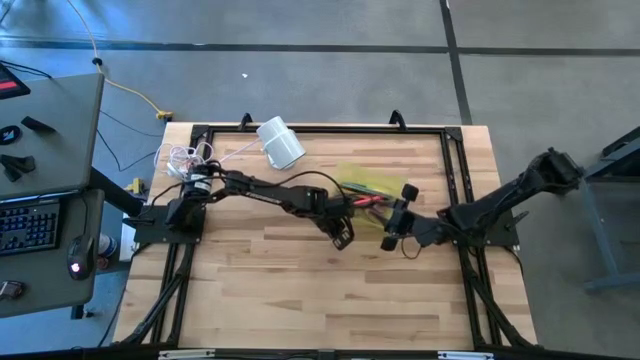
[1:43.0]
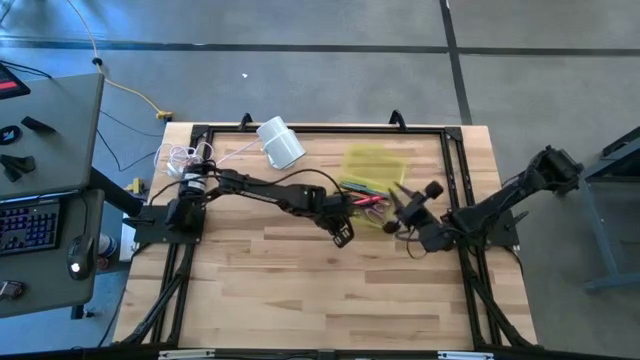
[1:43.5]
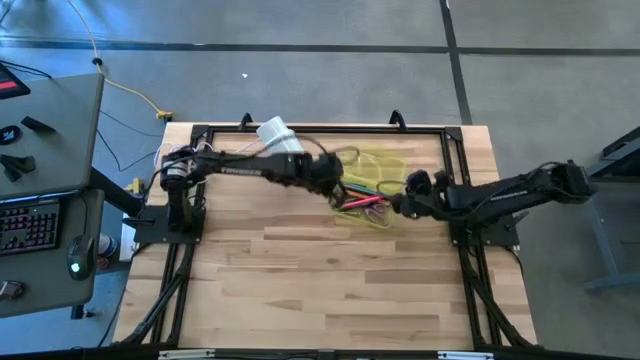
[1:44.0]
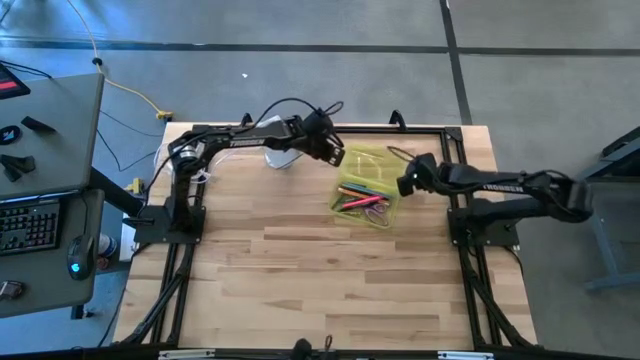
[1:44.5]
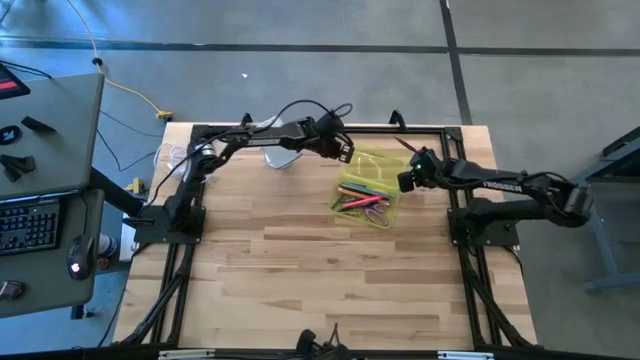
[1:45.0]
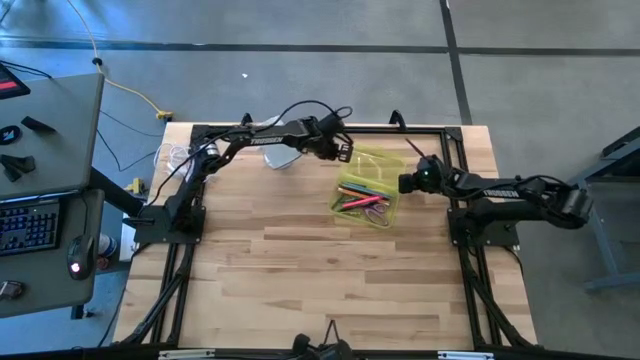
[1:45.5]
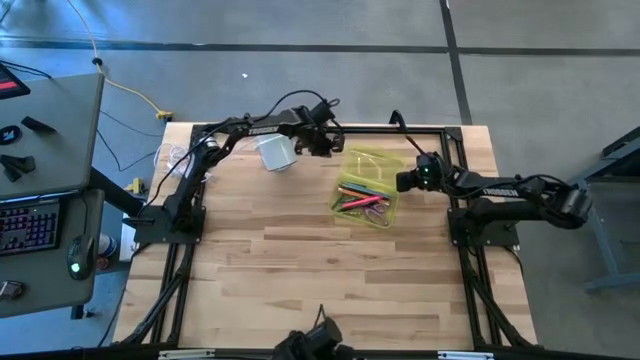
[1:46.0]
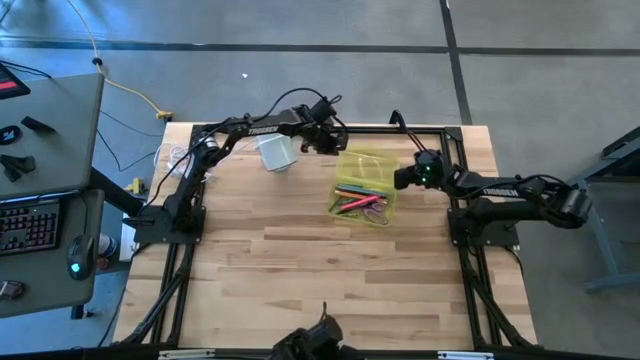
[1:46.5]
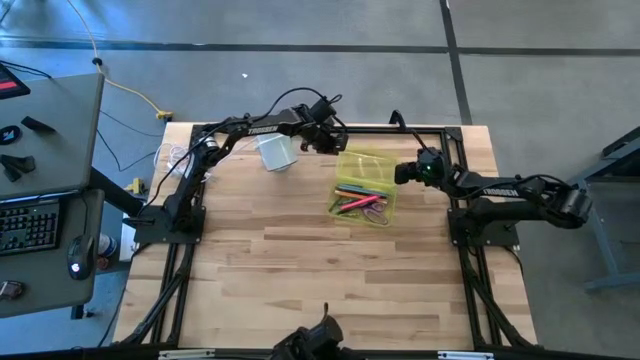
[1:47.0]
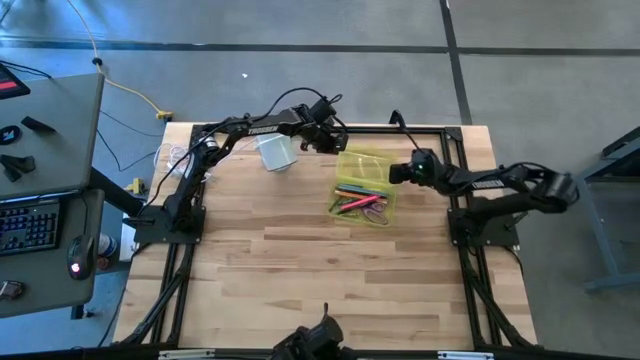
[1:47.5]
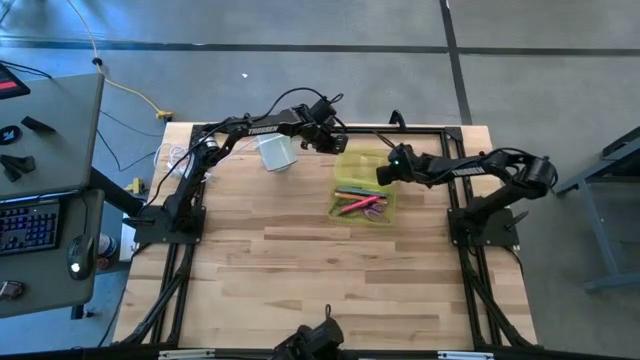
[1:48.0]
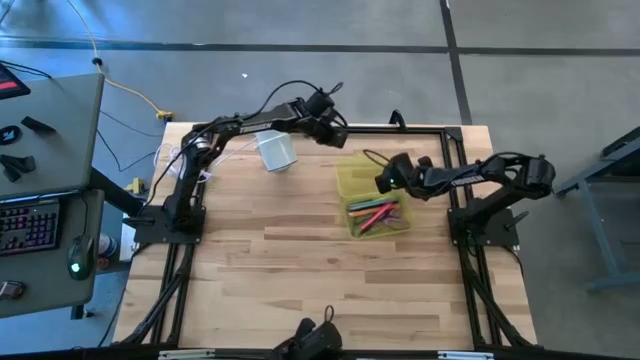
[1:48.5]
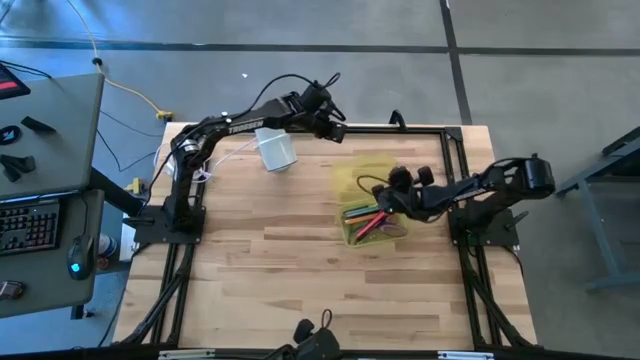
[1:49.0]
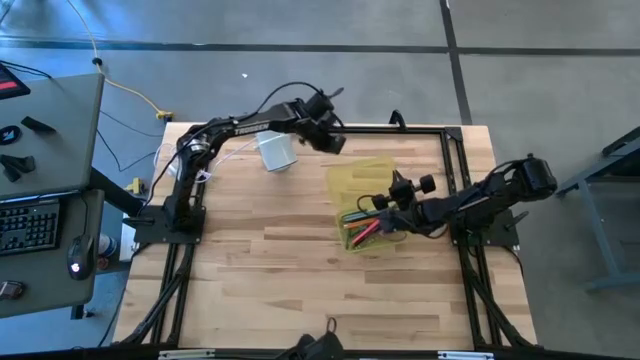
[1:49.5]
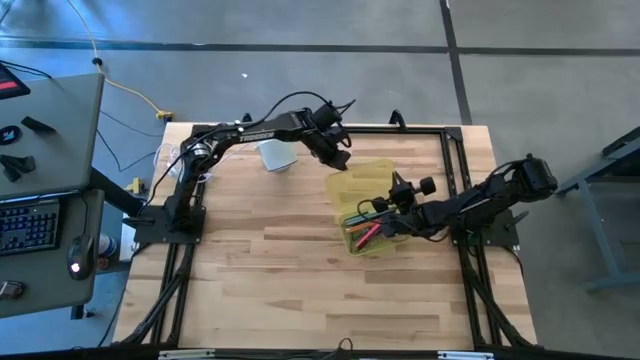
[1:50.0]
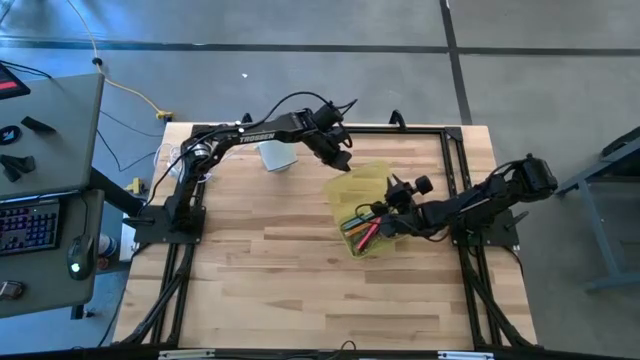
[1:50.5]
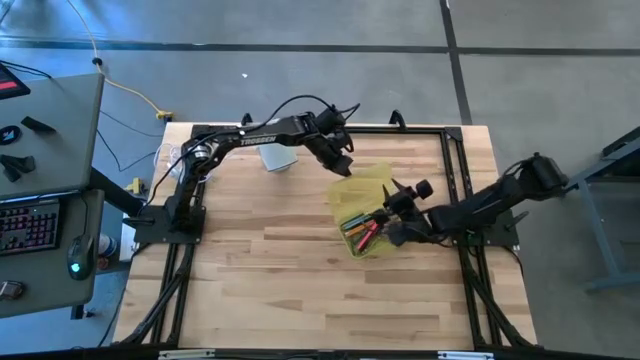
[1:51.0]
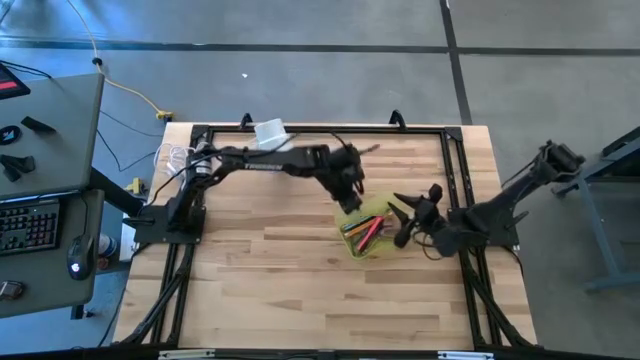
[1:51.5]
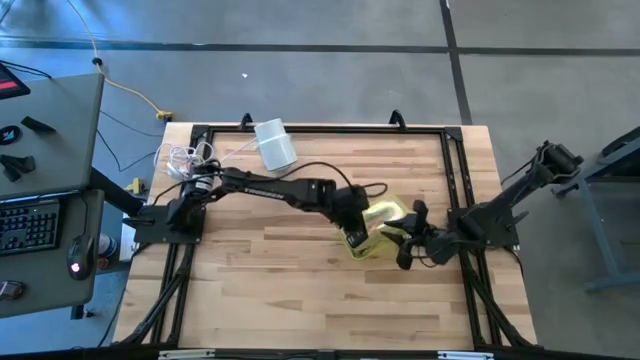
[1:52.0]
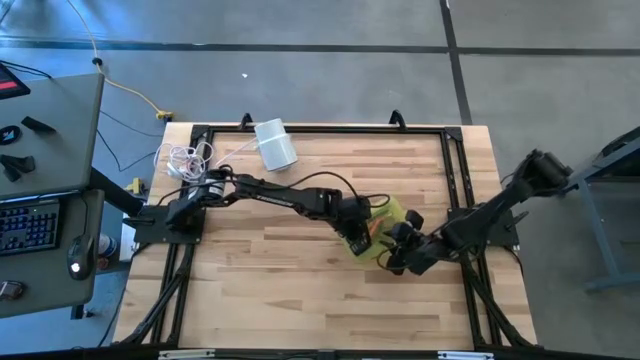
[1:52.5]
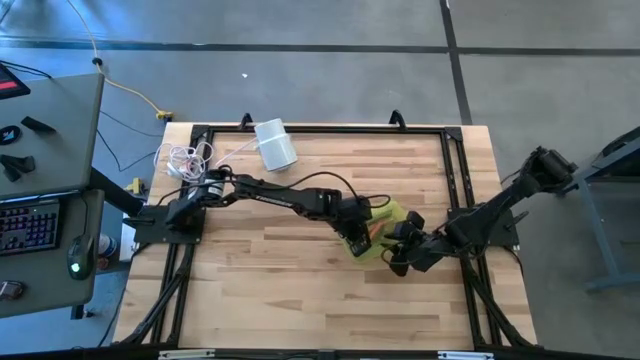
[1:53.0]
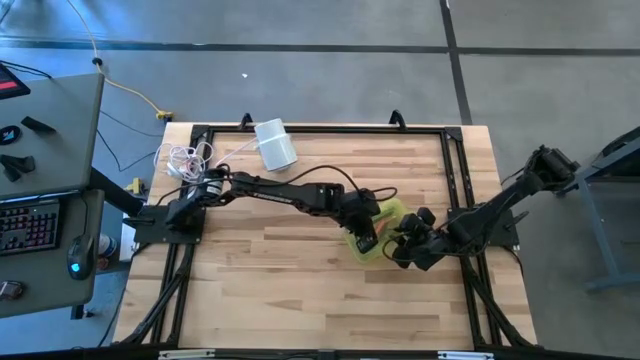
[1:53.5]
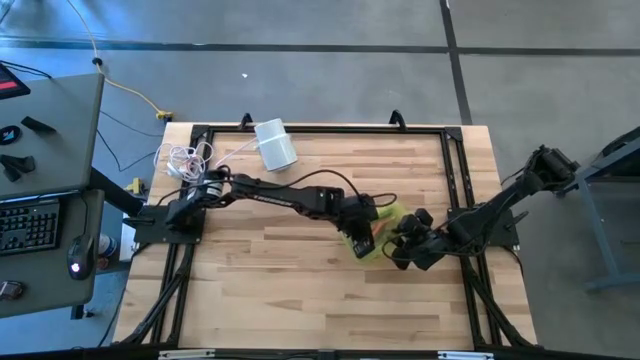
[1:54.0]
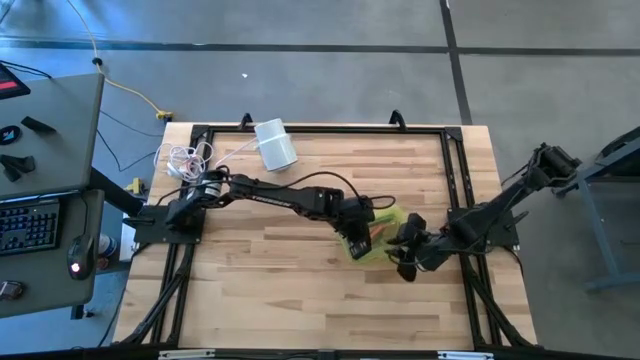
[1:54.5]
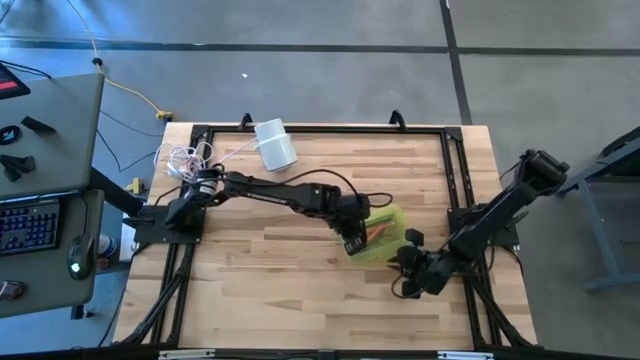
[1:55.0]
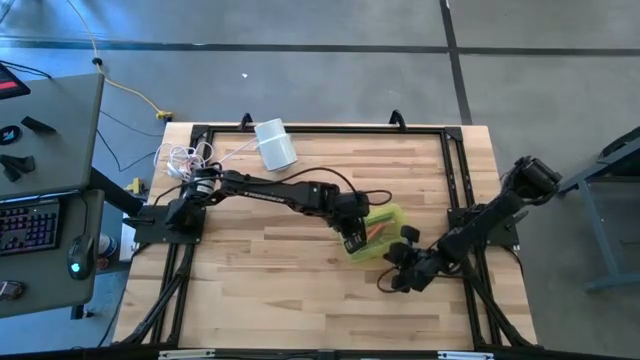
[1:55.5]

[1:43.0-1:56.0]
Task: Pick & place school supplies into a supply box
Close the supply box

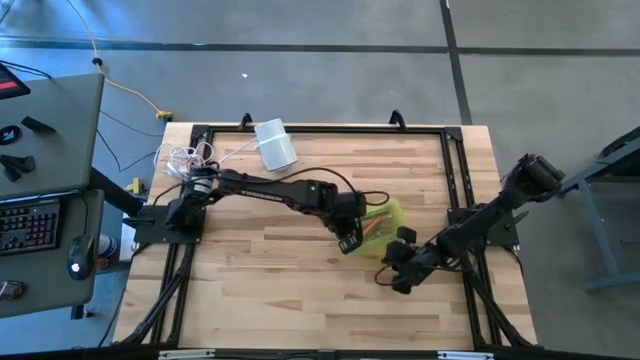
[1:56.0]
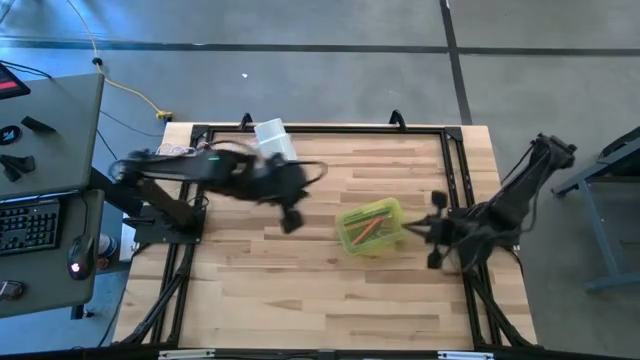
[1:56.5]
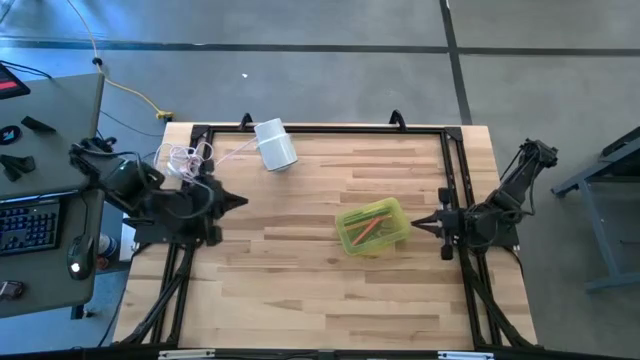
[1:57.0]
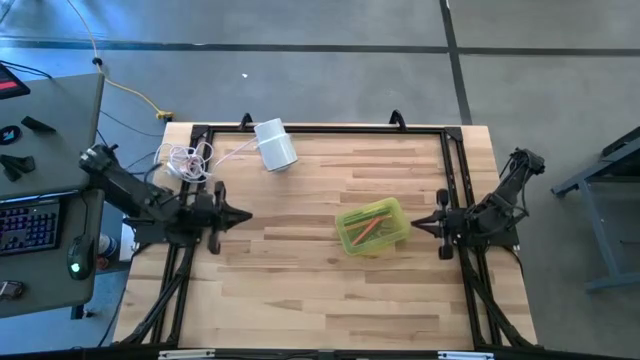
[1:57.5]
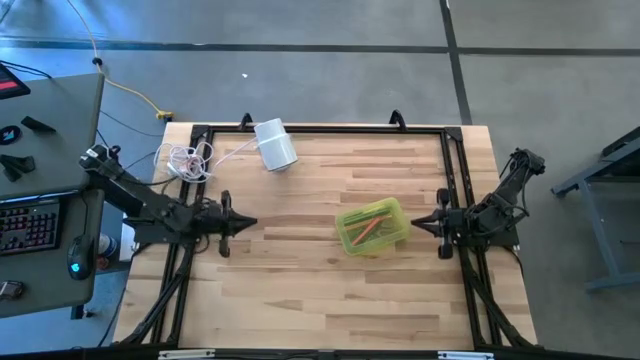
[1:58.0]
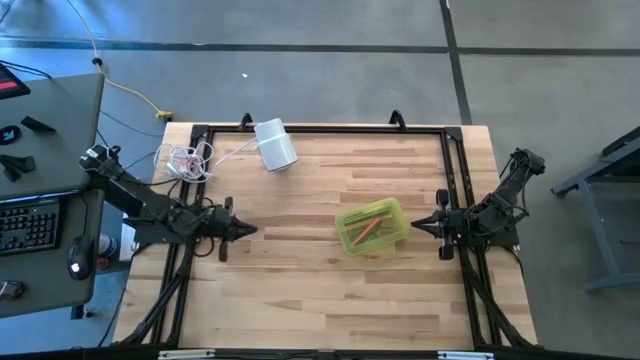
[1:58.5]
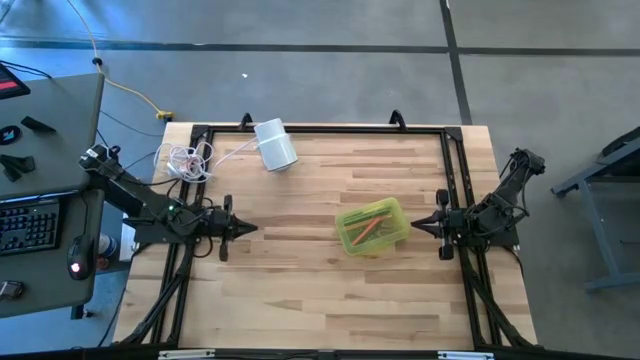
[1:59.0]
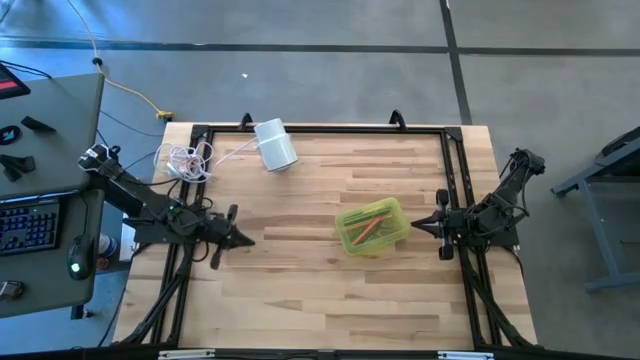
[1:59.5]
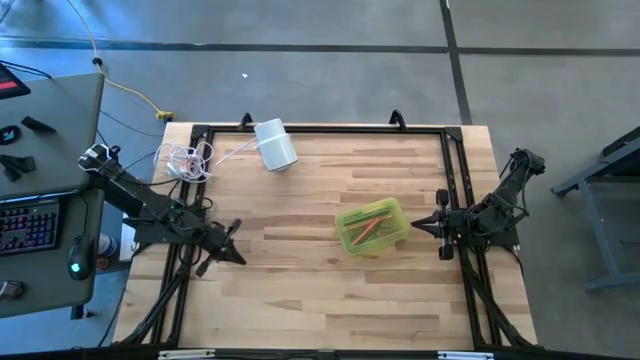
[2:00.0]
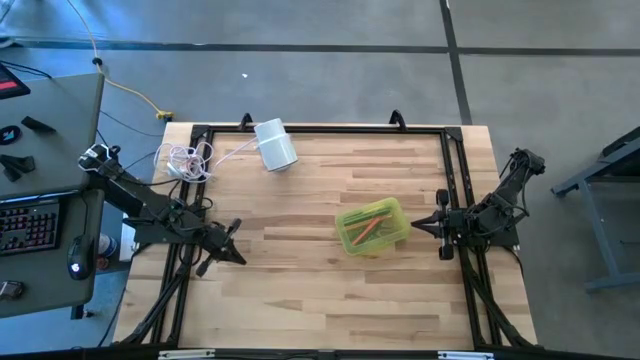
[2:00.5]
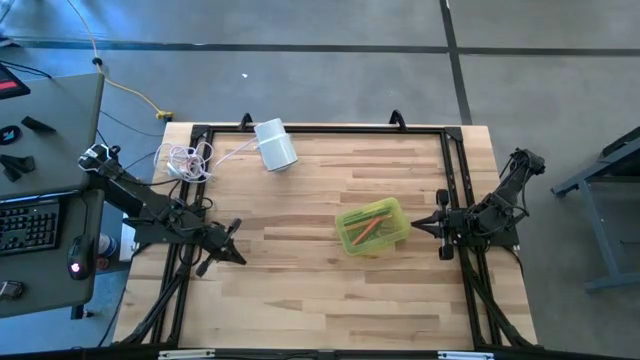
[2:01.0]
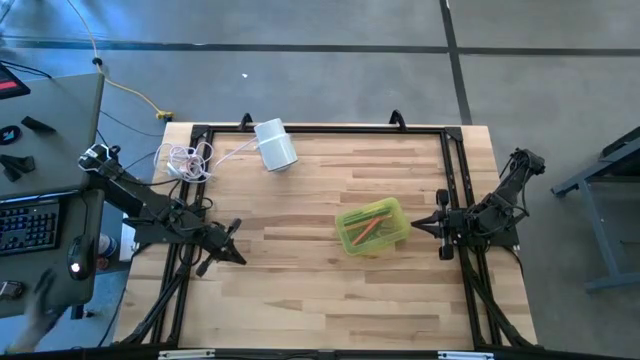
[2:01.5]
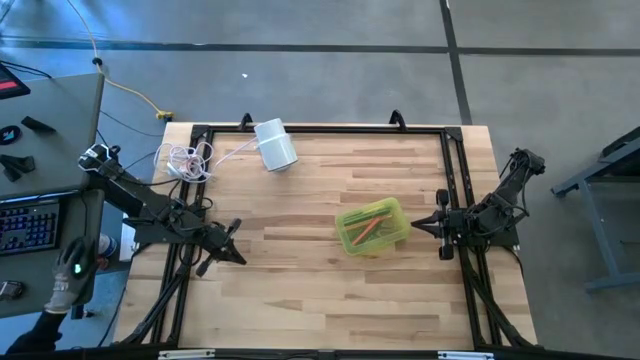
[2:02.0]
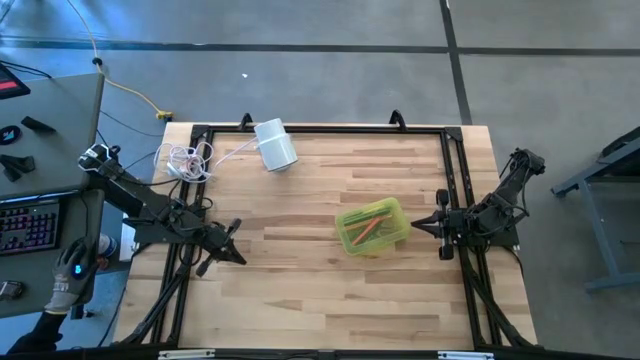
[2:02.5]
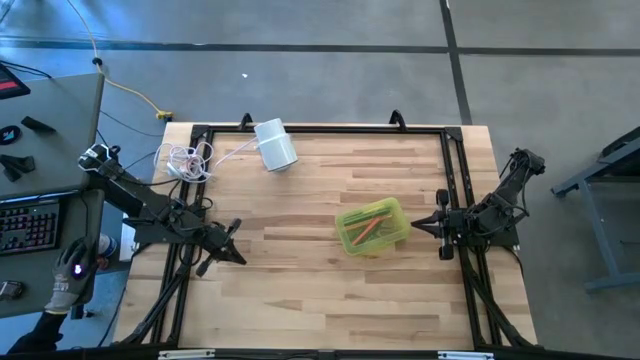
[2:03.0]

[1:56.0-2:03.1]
Return to Home Position
